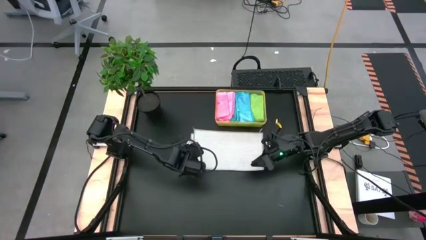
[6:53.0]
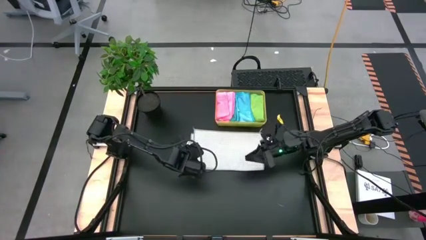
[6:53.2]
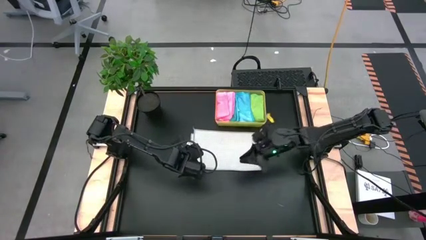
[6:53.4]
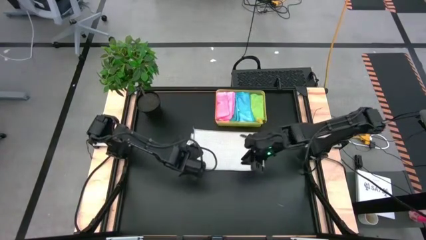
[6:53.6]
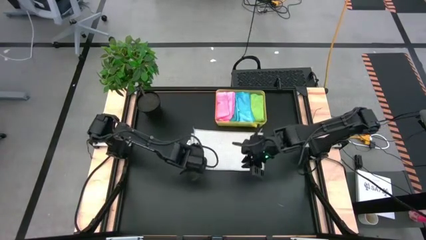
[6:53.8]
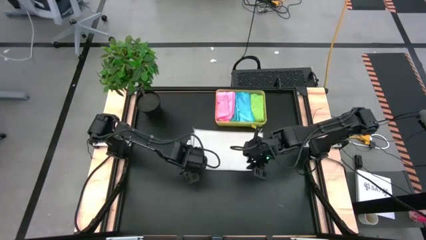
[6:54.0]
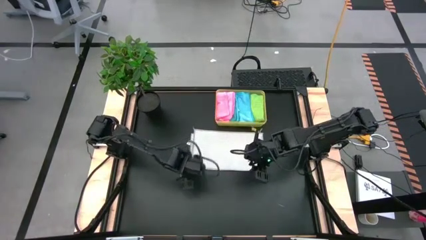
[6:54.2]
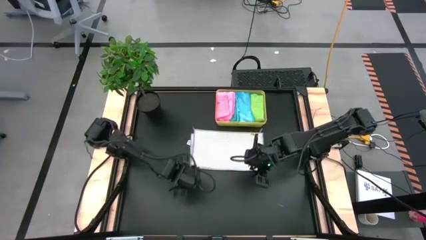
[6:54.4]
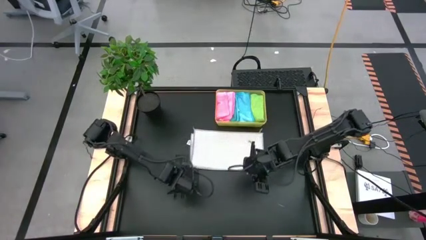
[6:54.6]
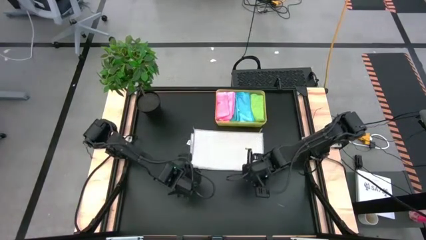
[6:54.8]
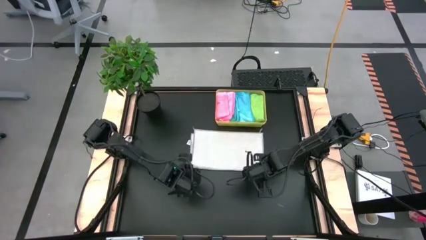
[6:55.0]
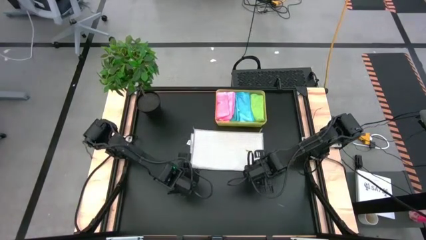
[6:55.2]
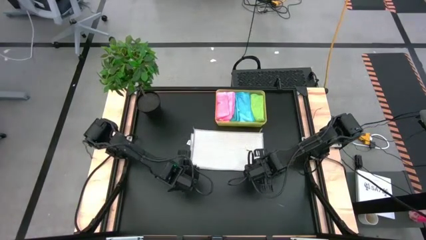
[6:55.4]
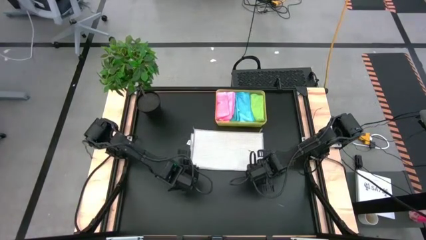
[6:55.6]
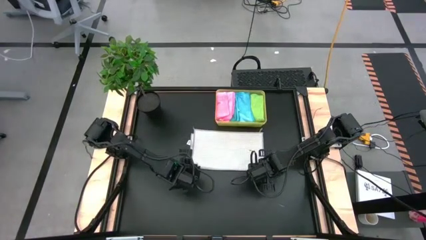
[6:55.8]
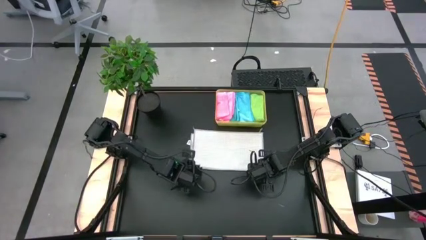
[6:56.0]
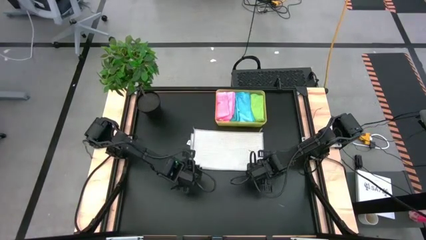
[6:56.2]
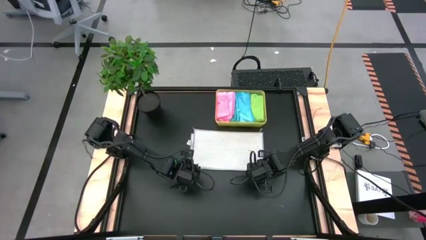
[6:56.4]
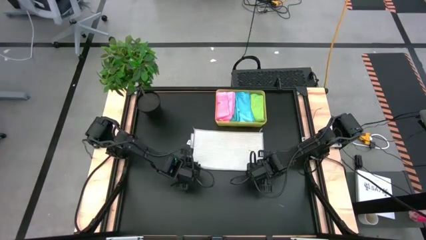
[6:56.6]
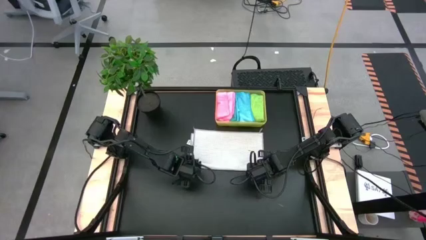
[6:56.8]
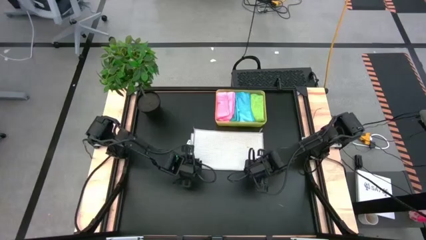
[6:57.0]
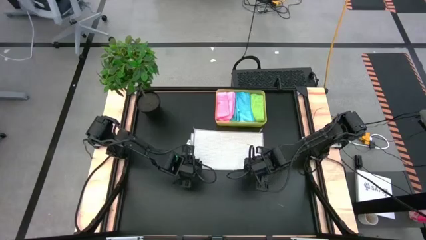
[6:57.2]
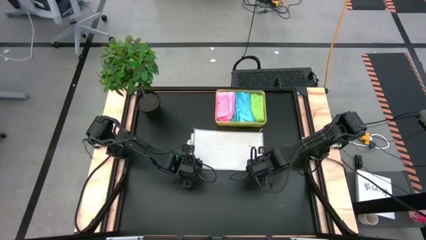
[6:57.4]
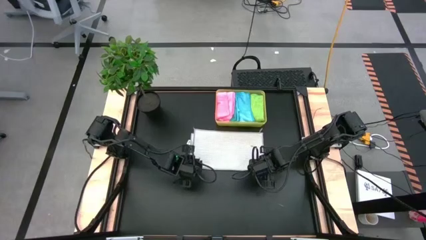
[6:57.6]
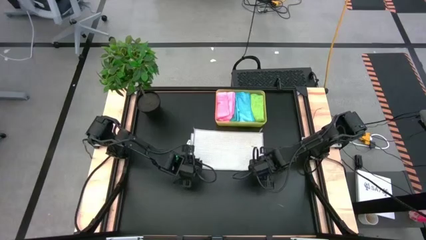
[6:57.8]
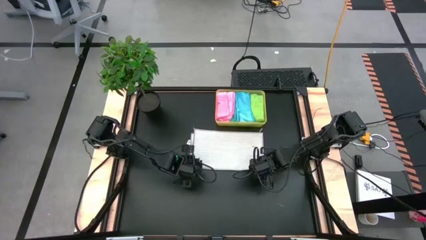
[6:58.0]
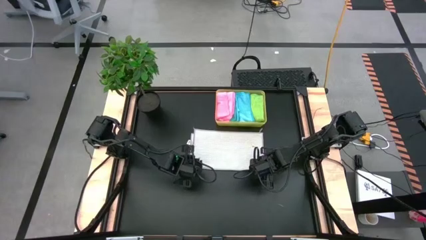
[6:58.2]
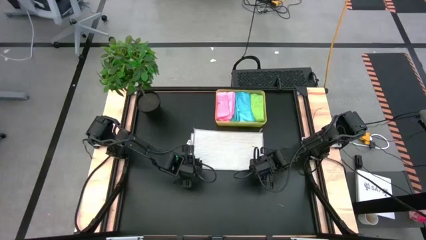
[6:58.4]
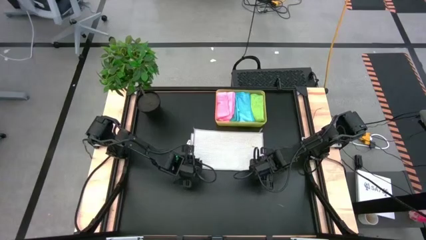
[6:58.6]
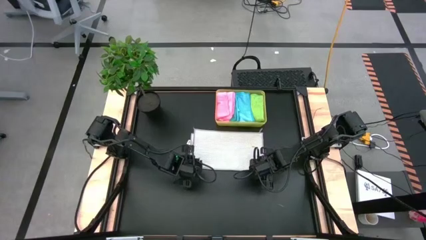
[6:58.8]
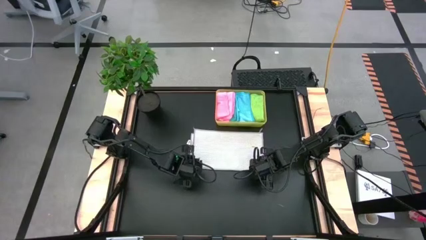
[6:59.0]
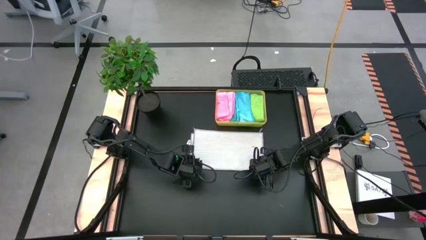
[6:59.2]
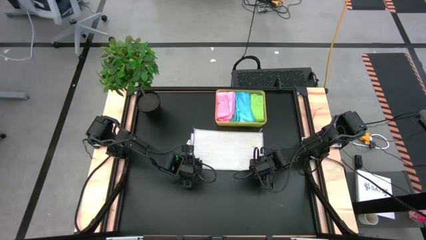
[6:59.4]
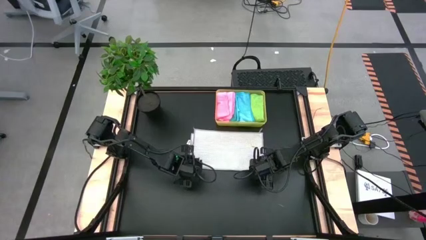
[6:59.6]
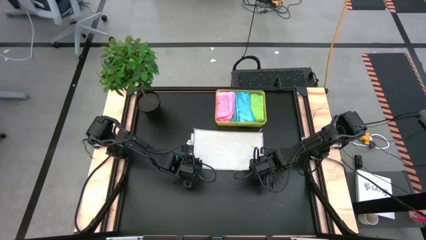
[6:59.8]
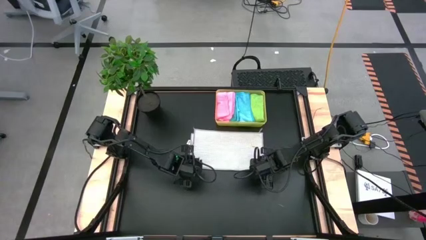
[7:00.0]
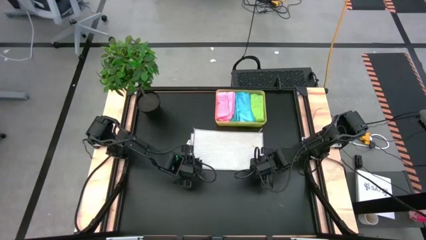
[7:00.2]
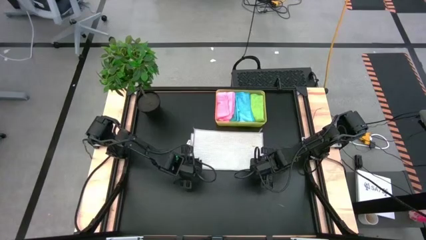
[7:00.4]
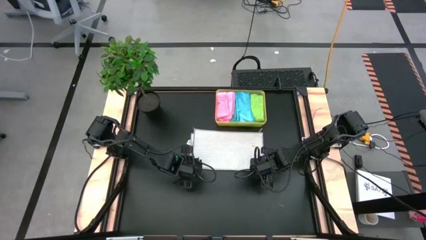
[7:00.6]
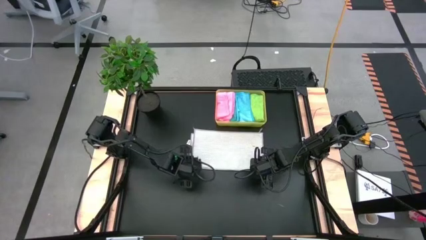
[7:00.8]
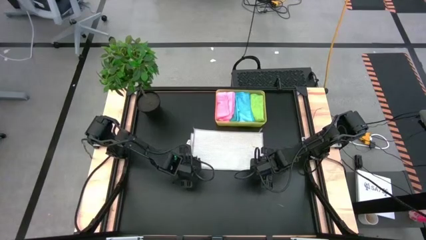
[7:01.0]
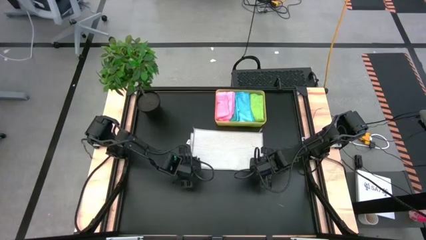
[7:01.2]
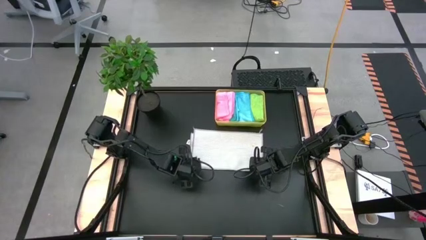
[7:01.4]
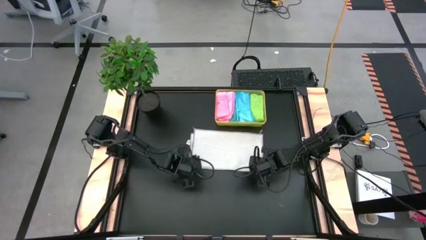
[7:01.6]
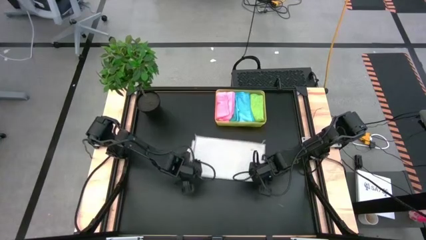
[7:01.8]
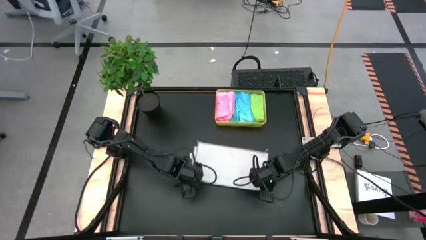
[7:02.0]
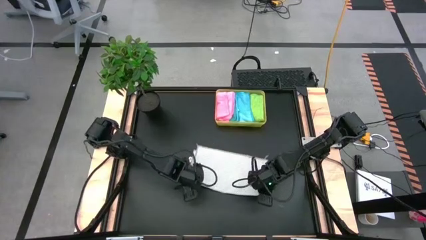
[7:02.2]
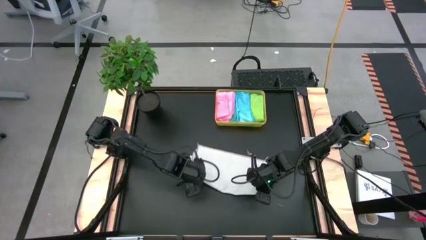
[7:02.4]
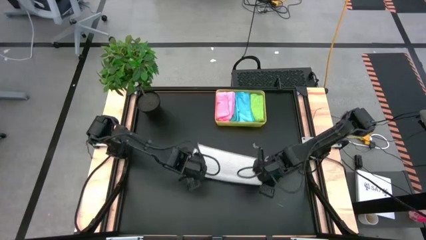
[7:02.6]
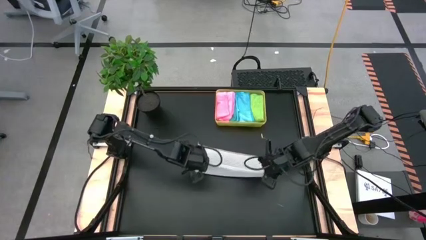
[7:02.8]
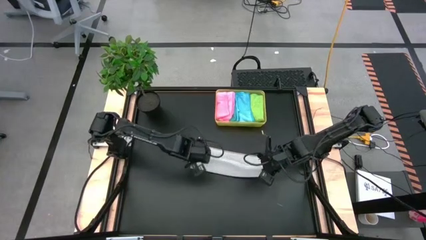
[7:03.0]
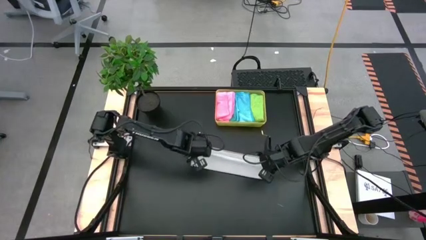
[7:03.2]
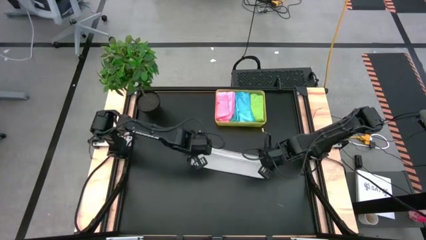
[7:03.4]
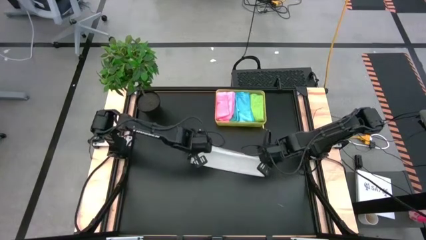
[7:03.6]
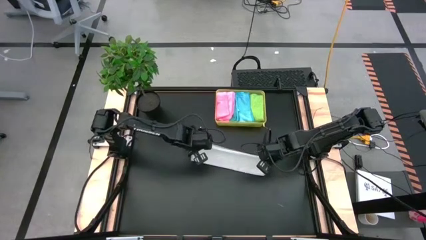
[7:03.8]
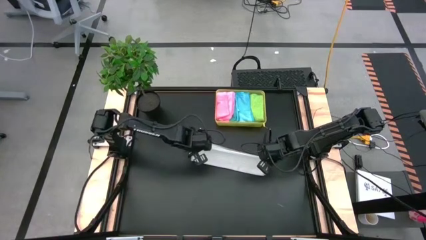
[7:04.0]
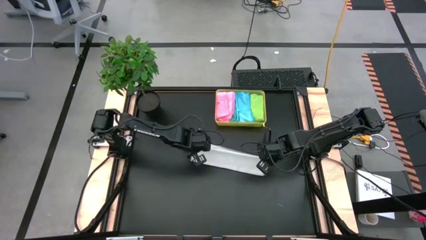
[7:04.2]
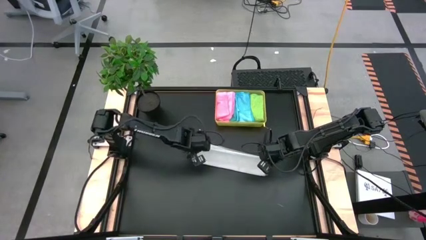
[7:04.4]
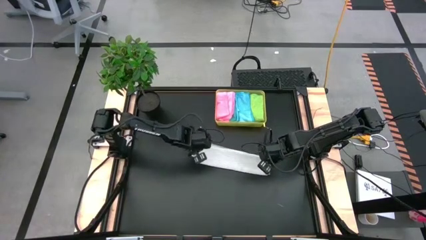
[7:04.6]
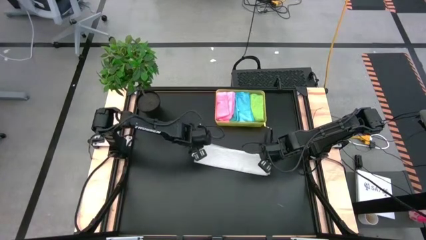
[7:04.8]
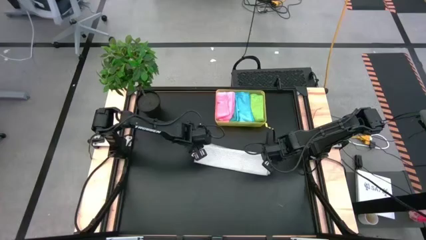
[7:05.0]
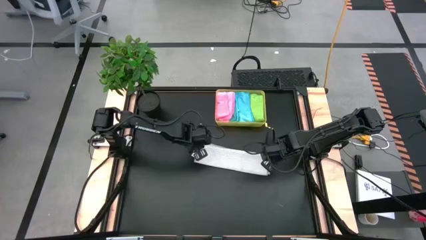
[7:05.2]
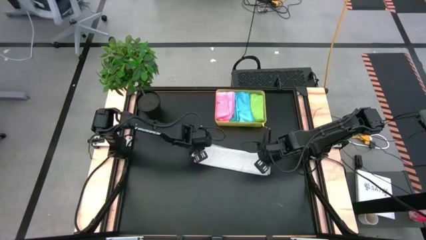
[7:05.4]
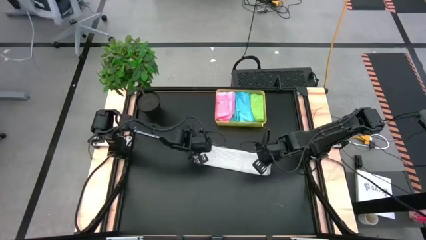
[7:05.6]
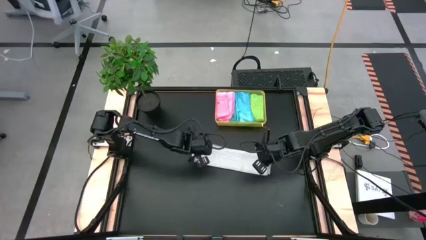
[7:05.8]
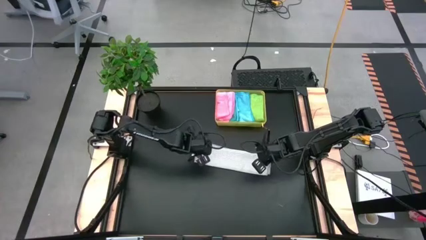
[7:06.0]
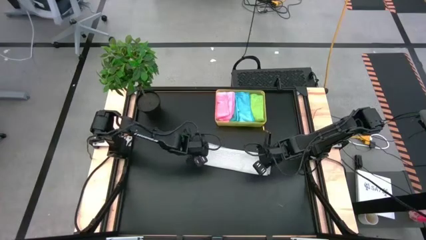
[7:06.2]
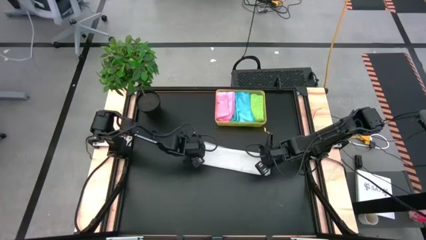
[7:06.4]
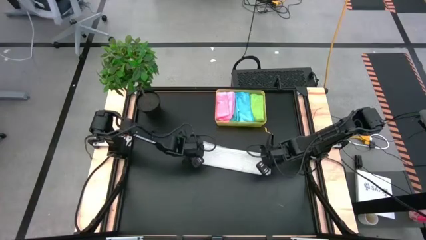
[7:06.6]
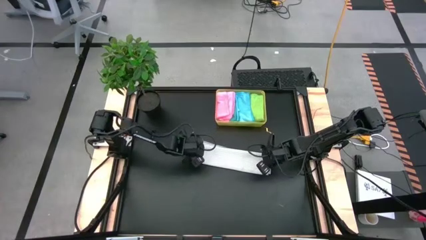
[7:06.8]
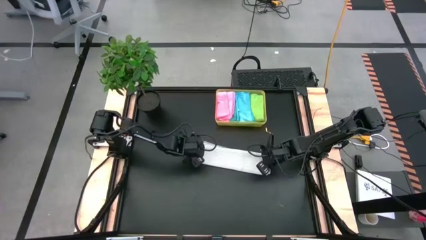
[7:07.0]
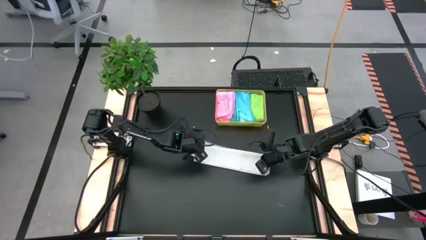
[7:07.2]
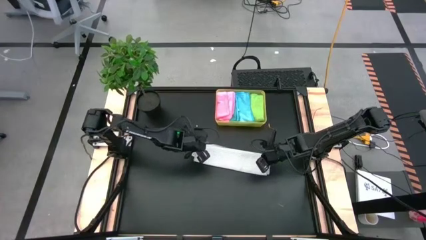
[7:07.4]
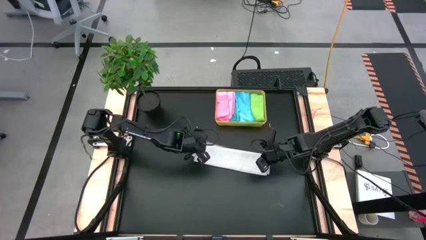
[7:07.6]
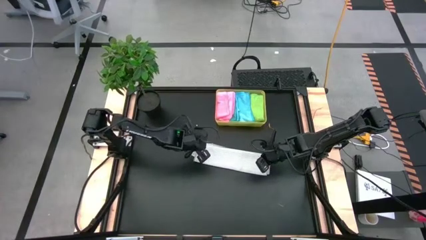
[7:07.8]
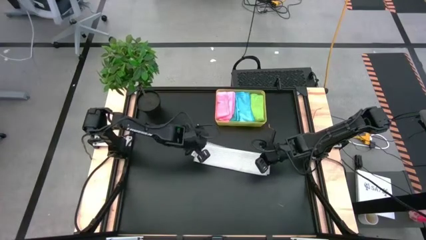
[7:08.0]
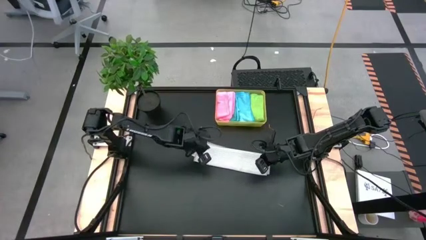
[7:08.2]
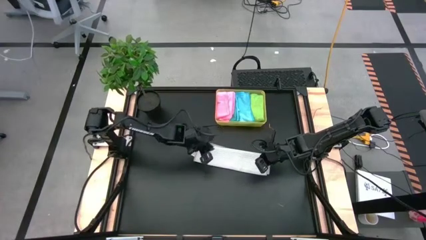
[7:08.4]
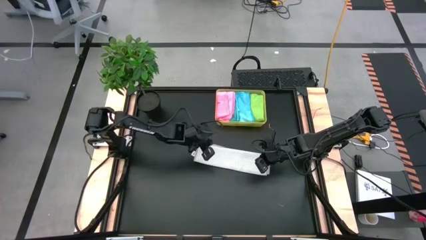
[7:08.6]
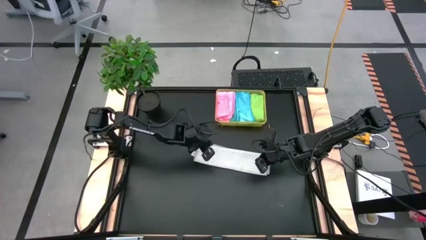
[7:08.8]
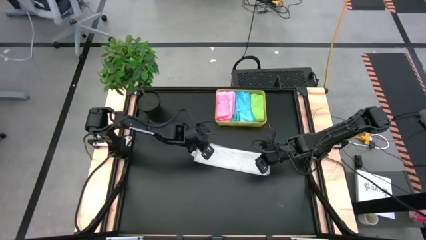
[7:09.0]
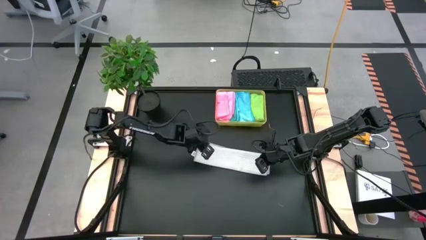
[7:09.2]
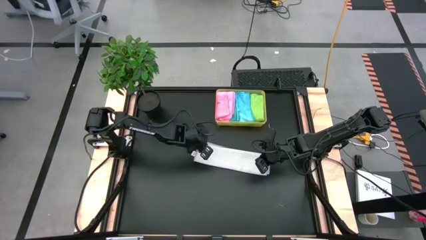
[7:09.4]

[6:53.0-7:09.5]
Task: Fold microfiber towels
Fold the white microfiber cloth
